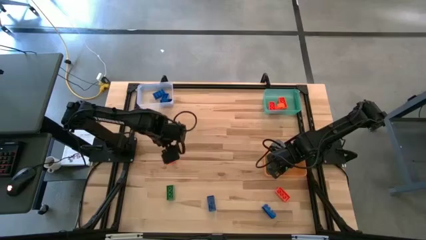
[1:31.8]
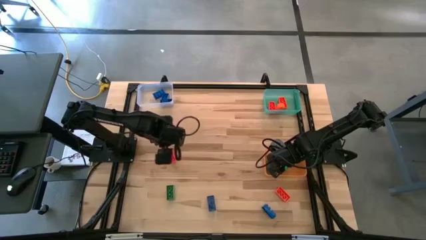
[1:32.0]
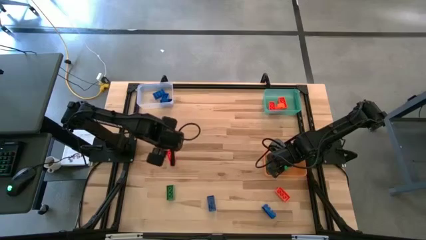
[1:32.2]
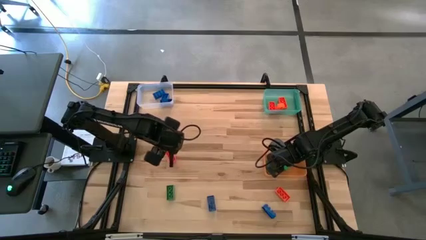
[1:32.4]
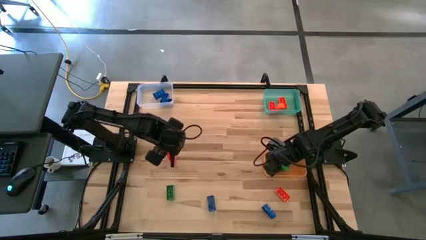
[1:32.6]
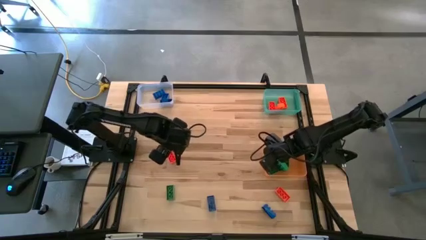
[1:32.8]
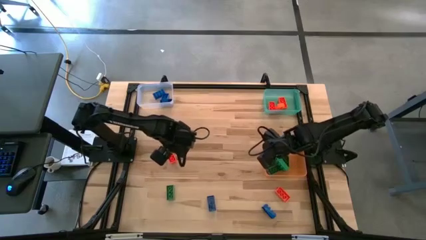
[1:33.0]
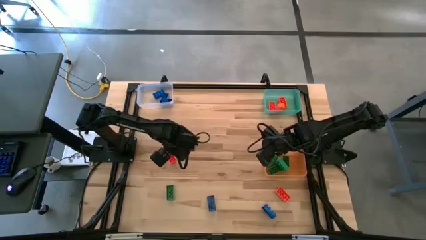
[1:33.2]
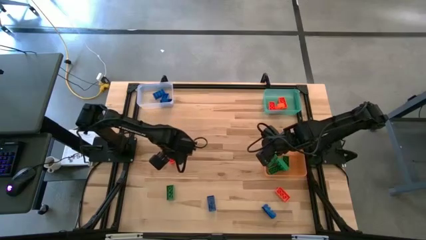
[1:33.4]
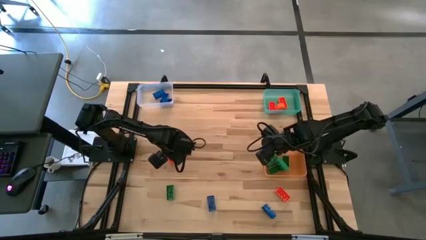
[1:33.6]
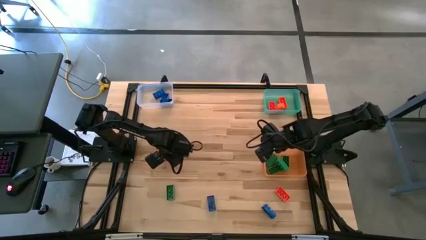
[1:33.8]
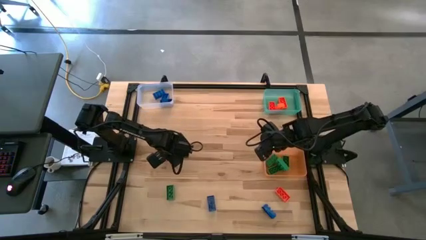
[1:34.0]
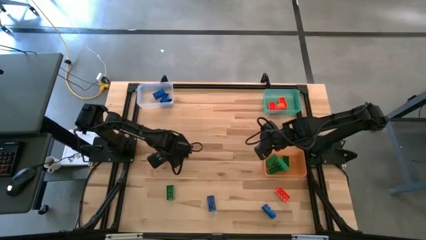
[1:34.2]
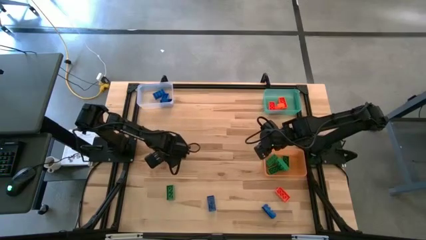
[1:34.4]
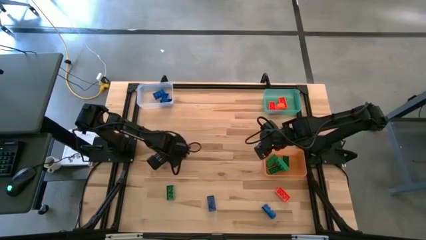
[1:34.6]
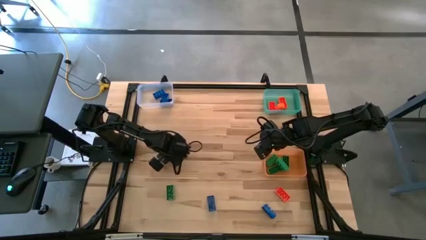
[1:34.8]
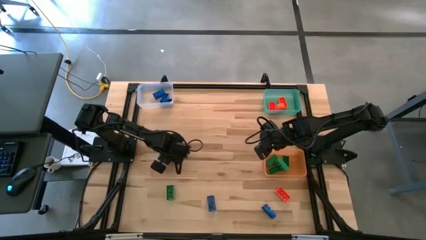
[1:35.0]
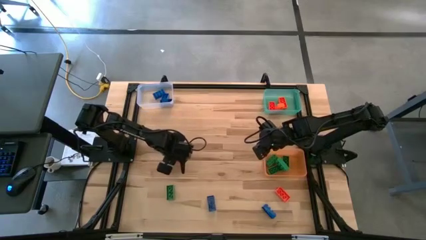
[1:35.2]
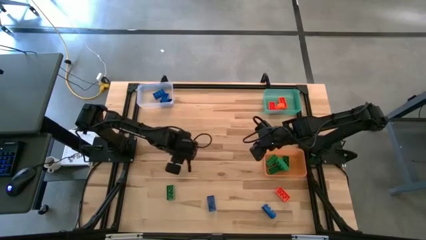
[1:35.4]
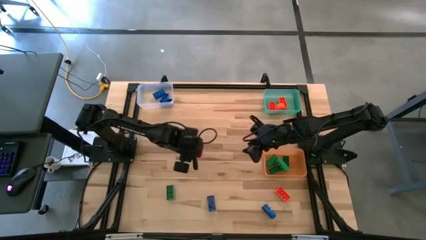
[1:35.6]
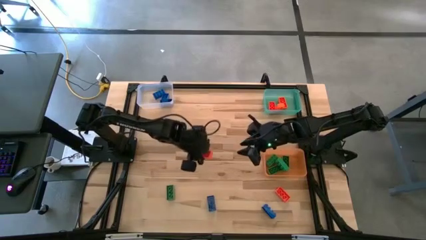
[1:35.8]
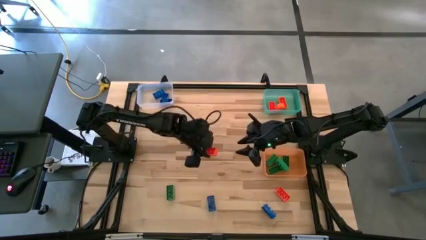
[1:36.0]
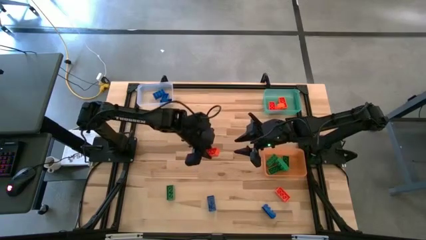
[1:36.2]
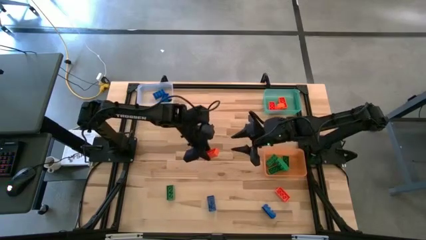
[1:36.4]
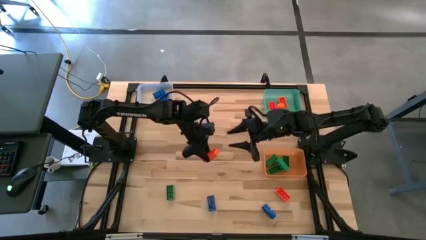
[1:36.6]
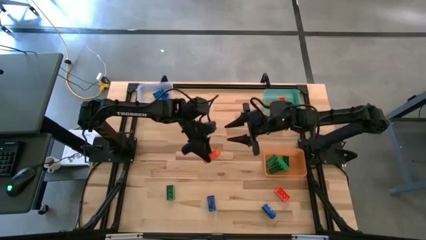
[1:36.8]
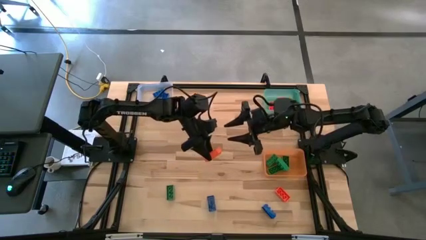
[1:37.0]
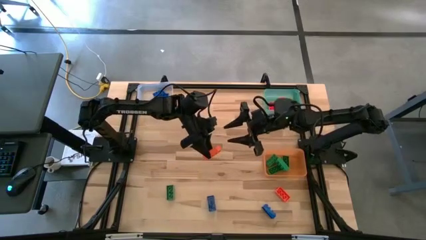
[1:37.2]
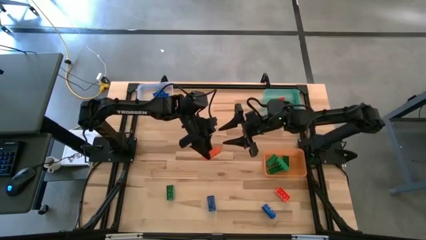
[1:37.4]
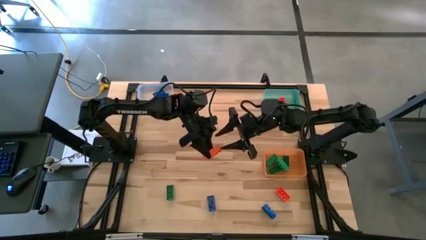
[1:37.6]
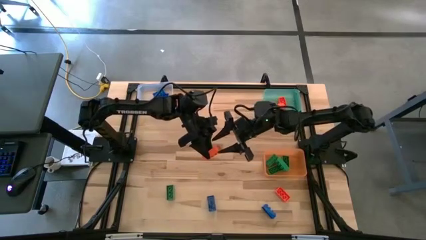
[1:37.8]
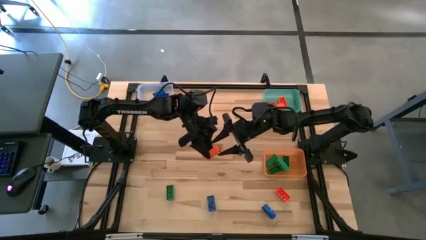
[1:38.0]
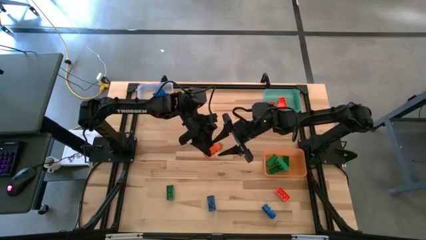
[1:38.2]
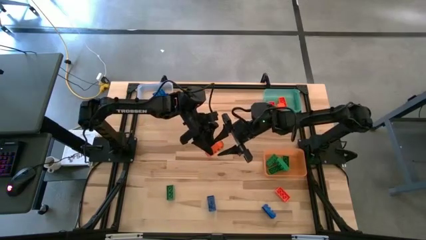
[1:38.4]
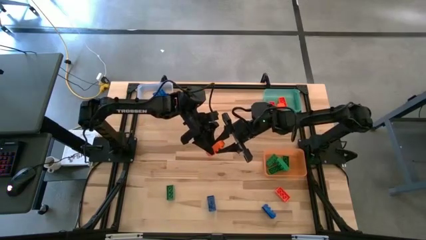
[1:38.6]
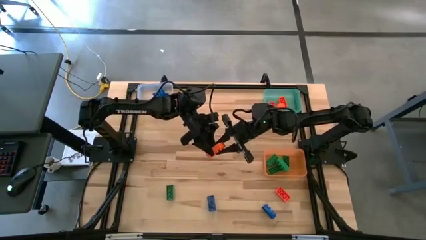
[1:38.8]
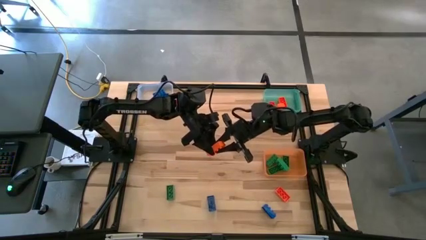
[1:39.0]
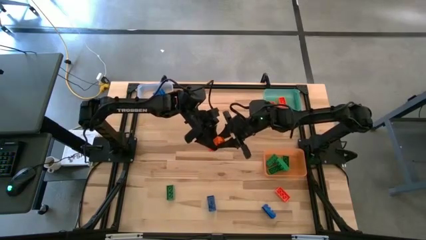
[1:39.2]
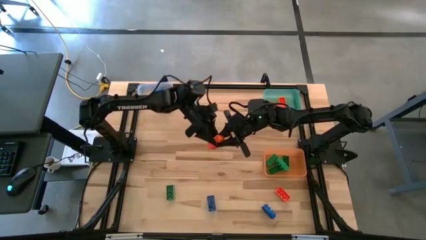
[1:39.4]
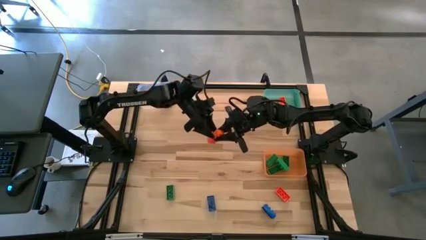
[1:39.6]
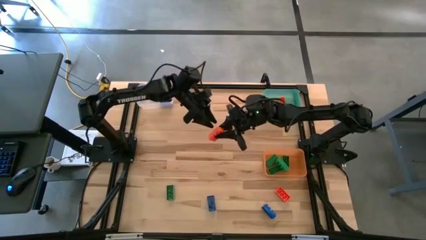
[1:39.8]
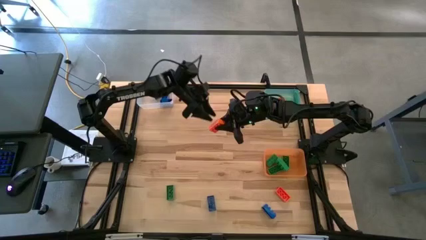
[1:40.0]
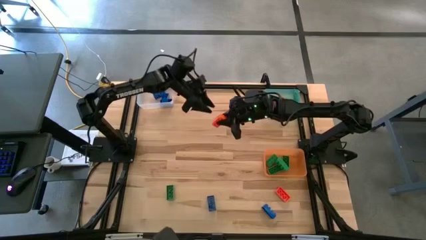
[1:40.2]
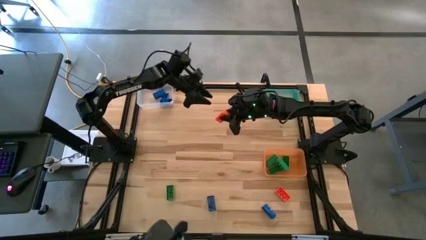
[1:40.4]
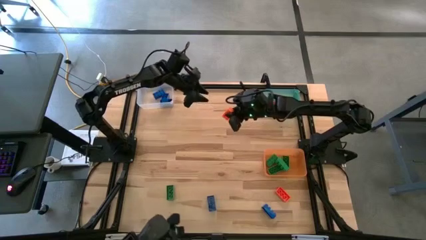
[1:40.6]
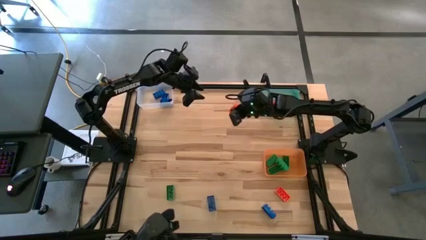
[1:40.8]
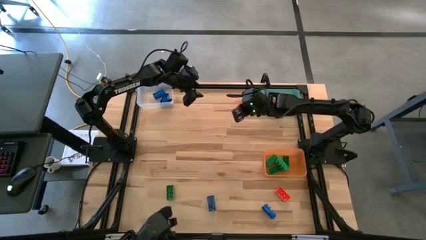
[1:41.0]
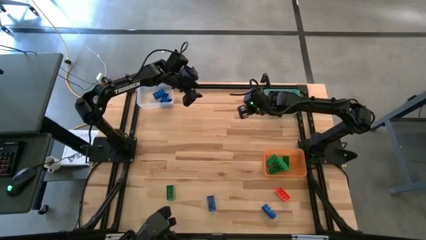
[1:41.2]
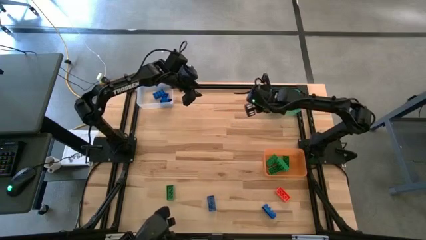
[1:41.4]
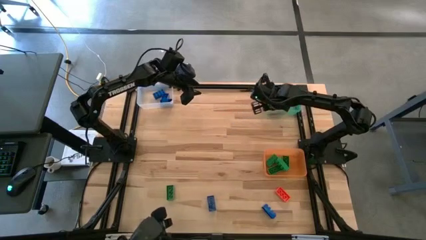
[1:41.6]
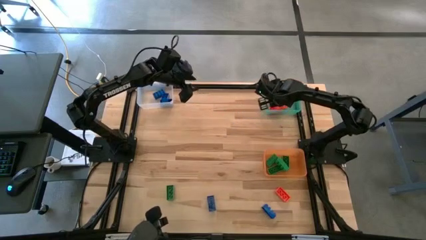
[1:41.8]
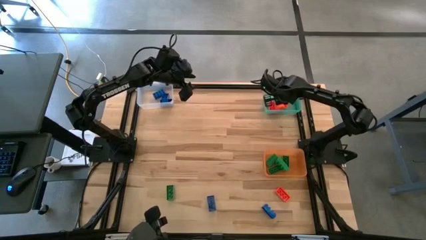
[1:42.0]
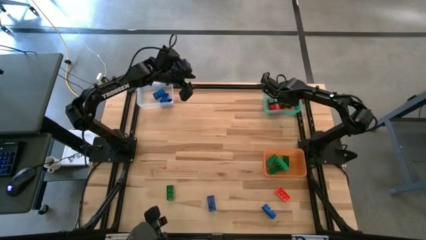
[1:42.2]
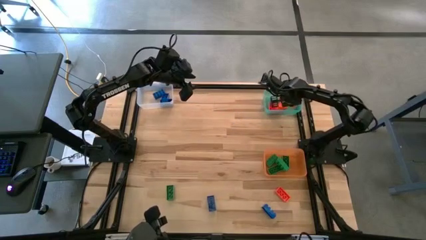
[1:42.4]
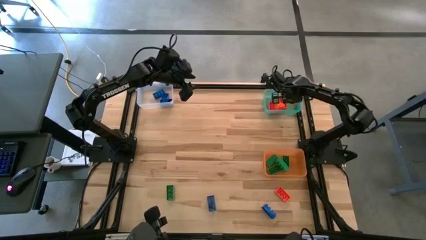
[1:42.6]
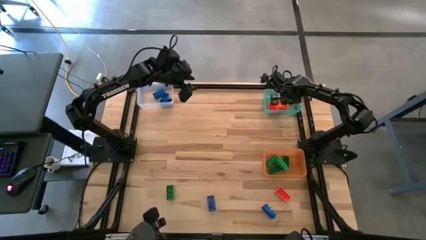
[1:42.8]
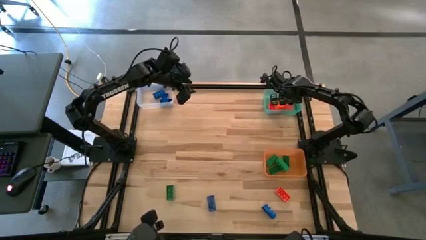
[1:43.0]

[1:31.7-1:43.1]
Task: Sort & place blocks by color
Put the orange game piece into the green bin
